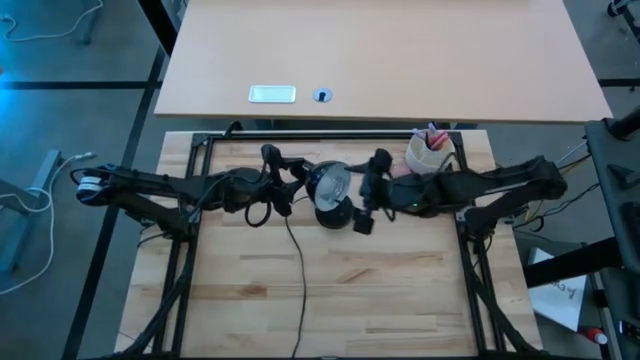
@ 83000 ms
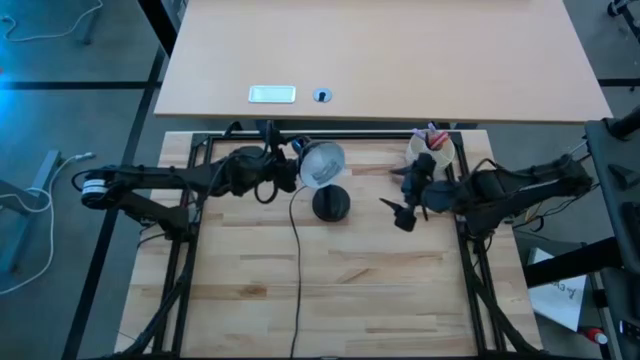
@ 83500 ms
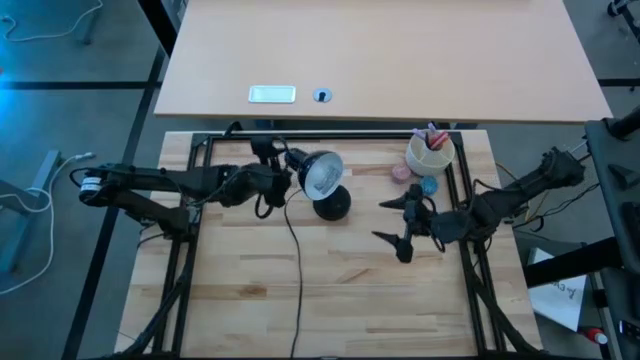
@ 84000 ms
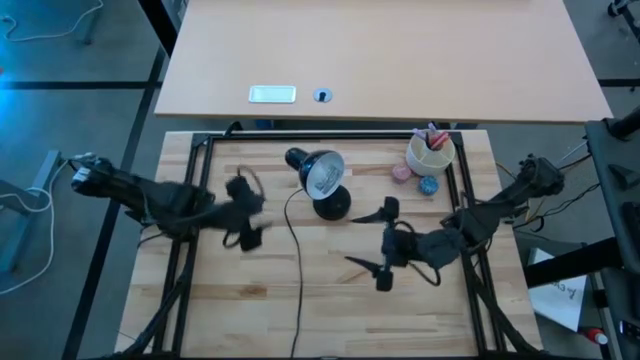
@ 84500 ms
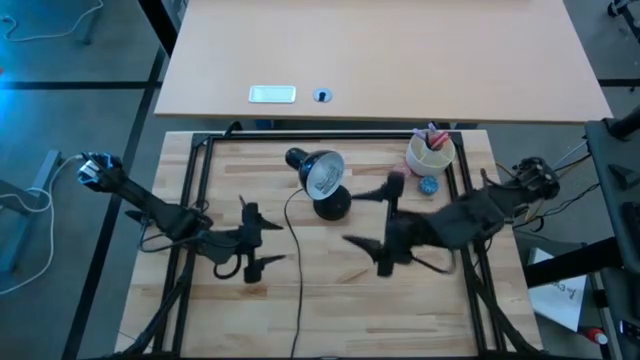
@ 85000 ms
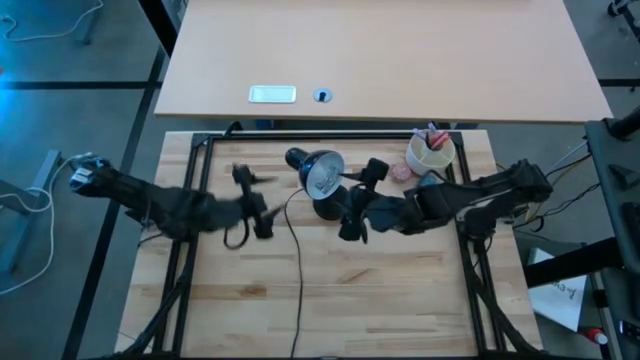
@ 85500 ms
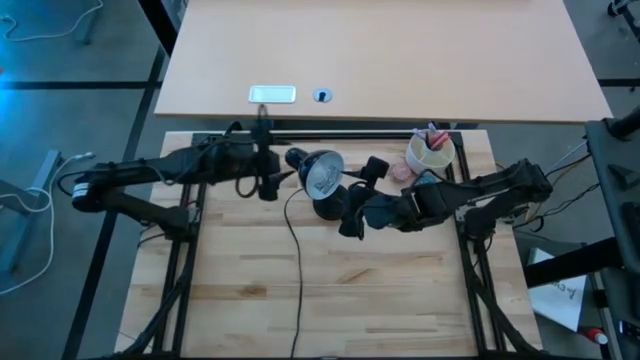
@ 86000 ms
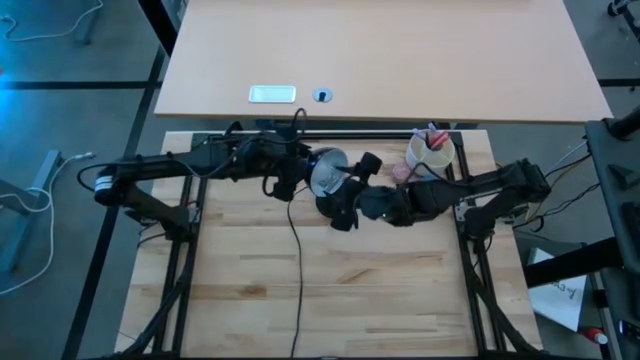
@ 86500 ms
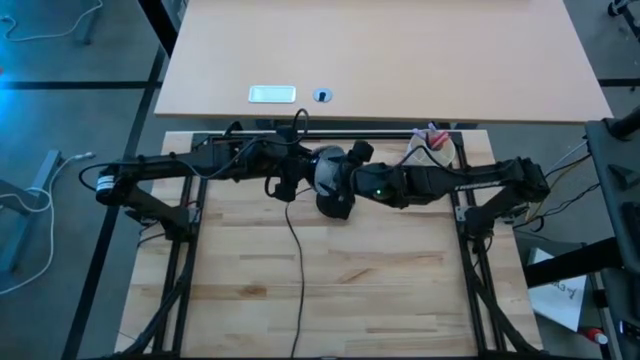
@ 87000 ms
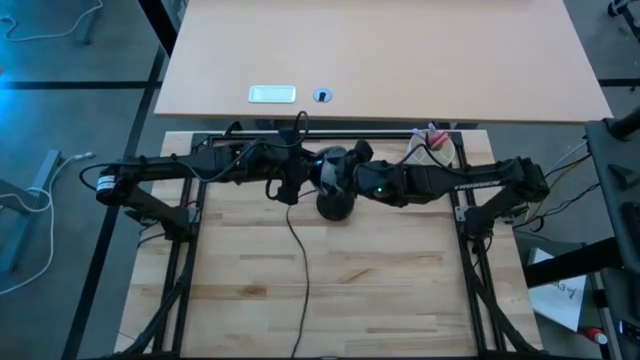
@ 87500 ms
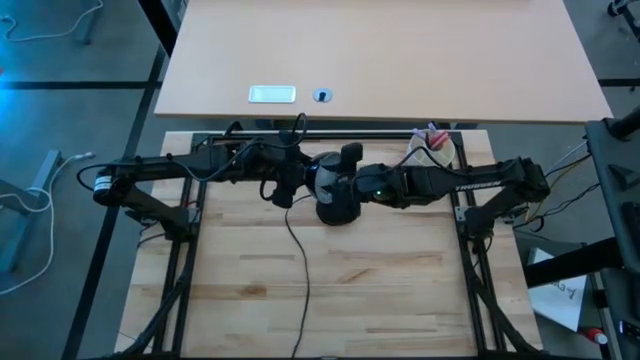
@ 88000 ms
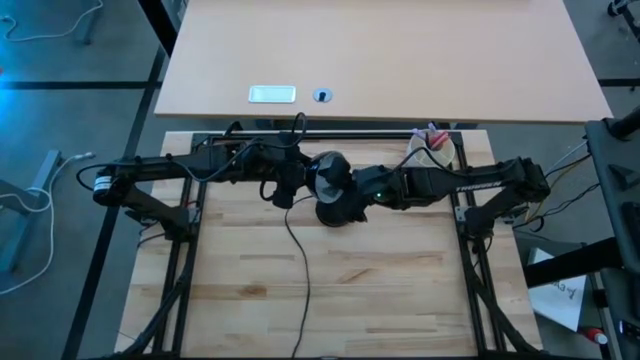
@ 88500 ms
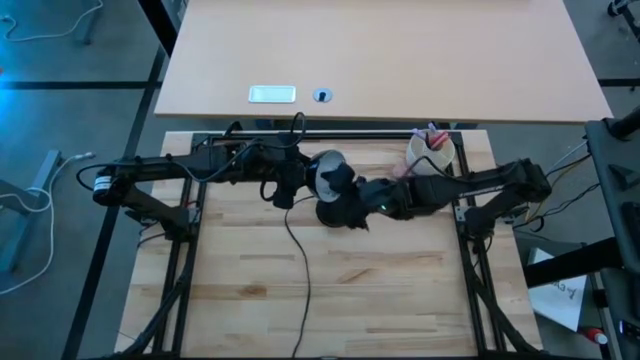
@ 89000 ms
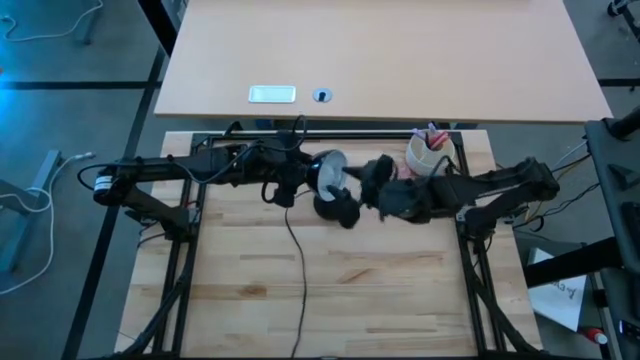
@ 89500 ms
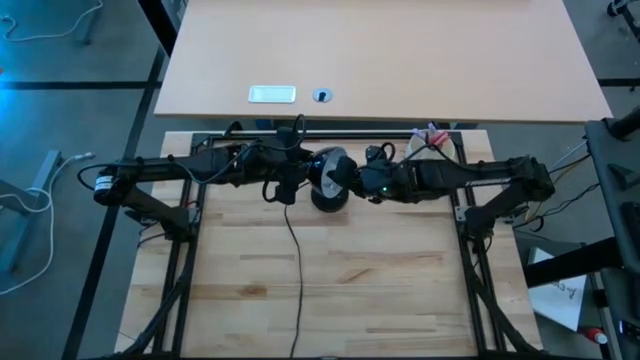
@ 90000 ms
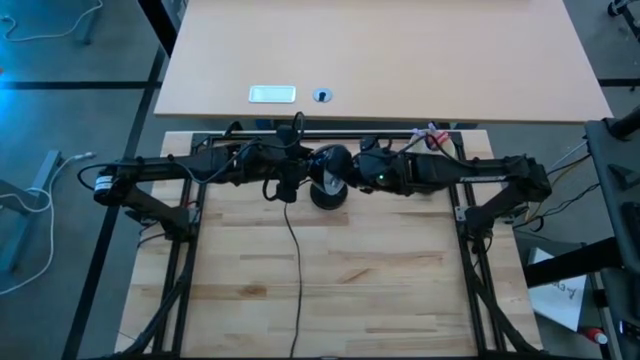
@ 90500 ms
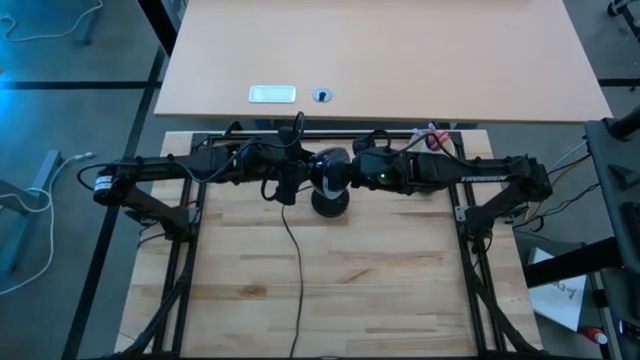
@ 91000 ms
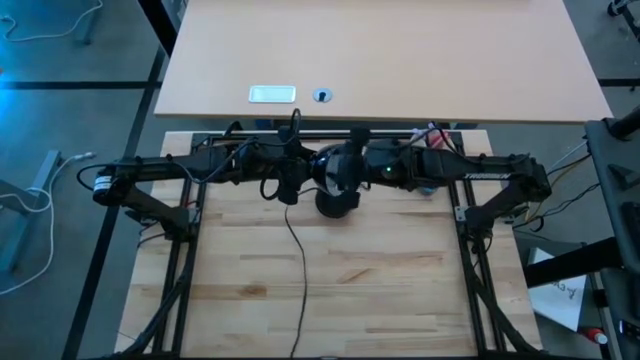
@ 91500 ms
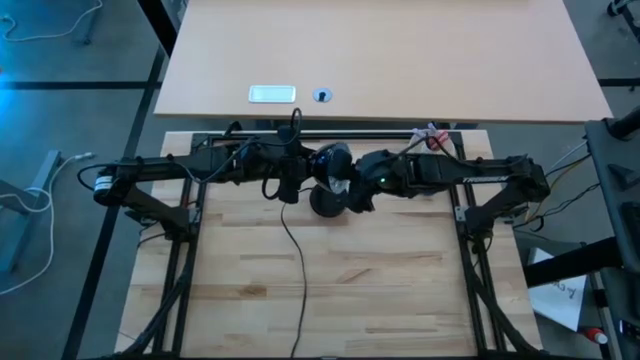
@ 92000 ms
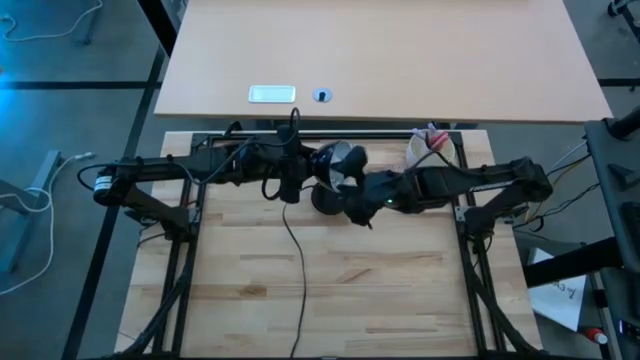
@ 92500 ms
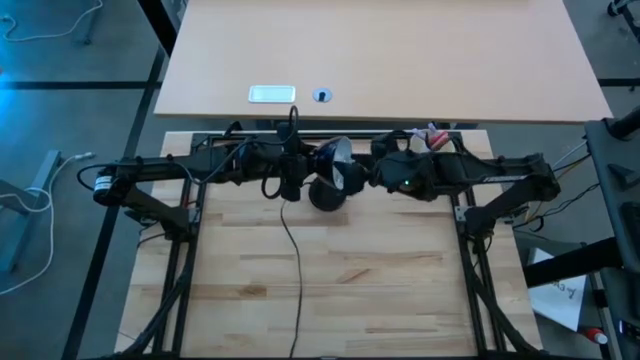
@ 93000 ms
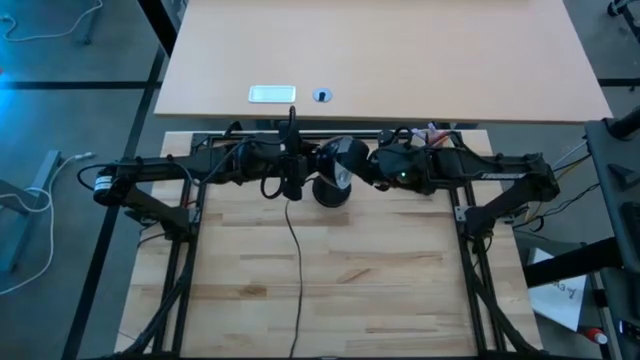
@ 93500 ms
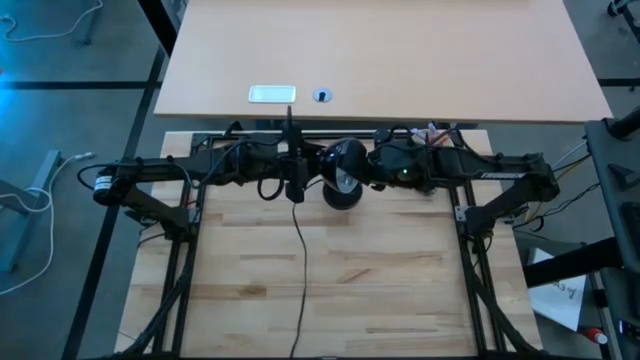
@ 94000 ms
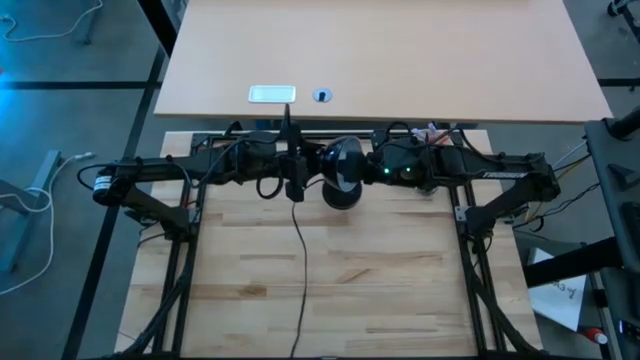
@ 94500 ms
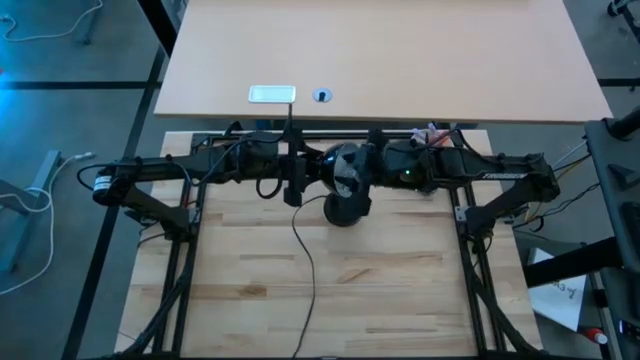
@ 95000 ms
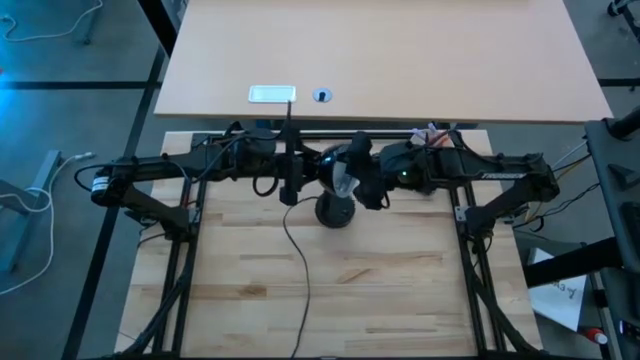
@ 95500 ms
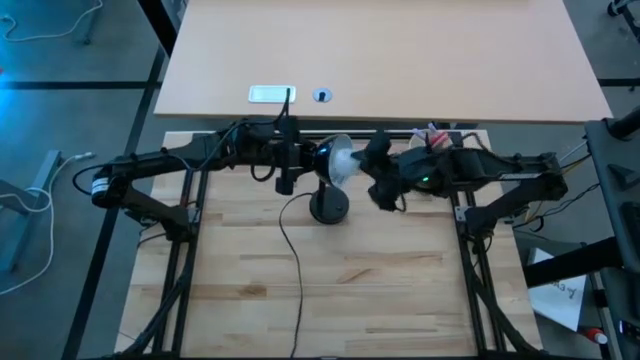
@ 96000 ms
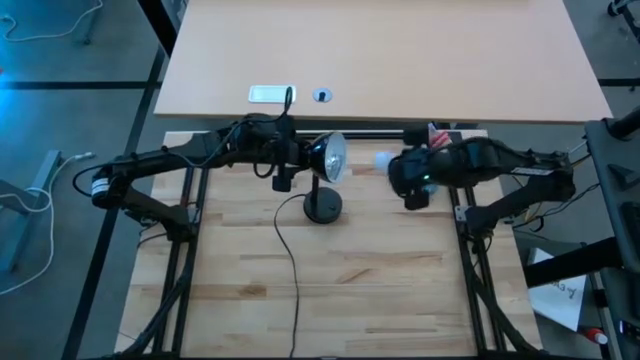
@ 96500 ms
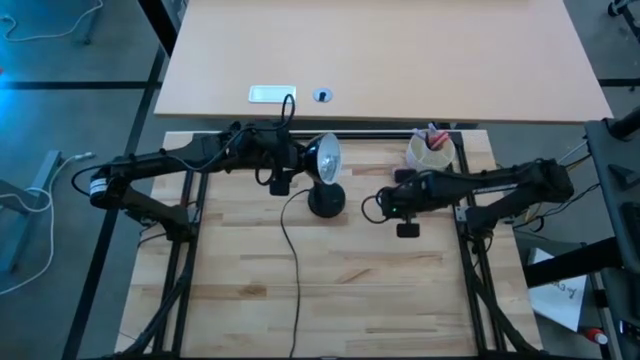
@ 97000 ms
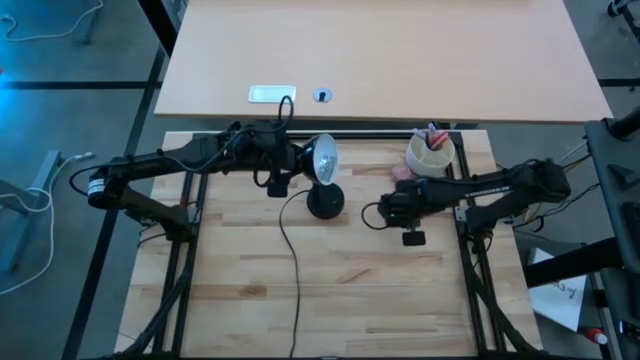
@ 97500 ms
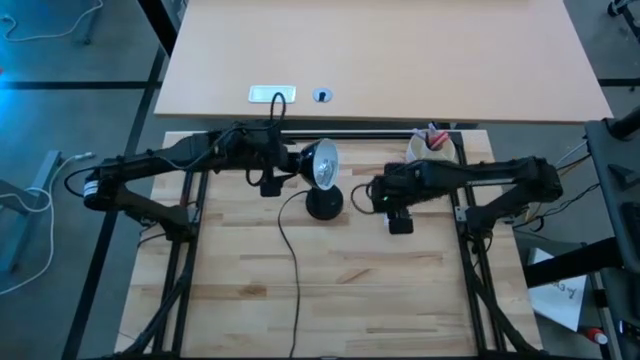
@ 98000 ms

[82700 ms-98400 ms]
Task: Screw lightbulb
Remove the lightbulb from the lamp

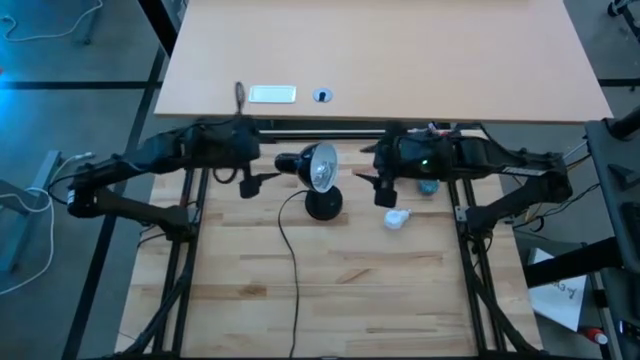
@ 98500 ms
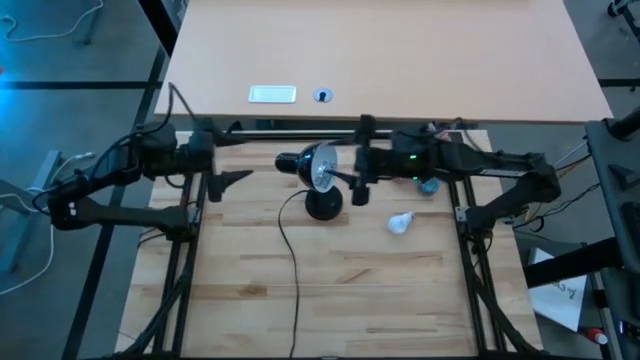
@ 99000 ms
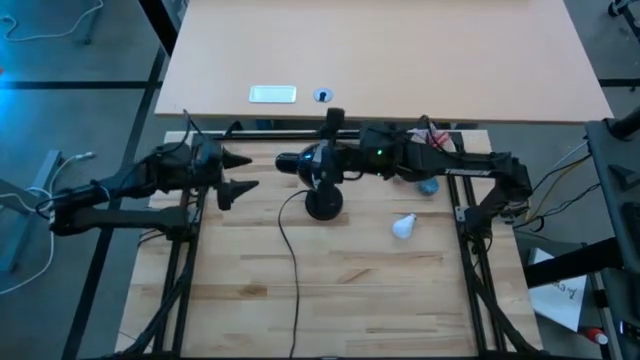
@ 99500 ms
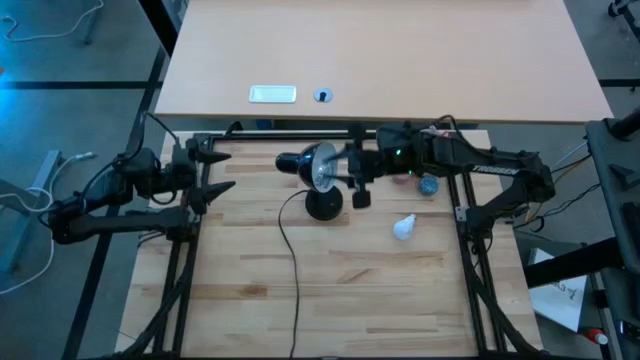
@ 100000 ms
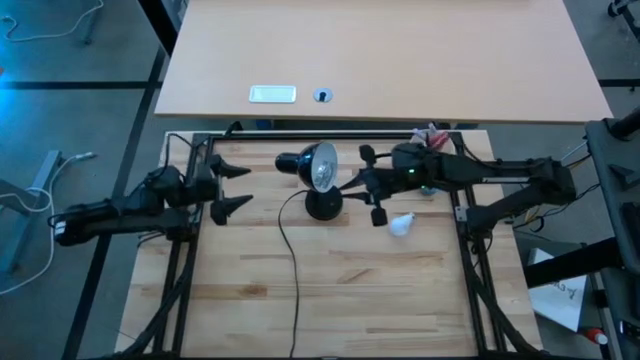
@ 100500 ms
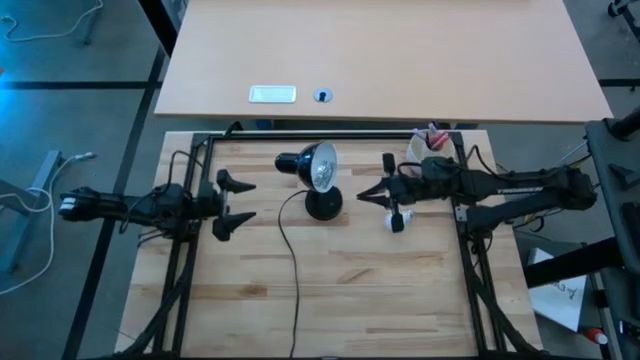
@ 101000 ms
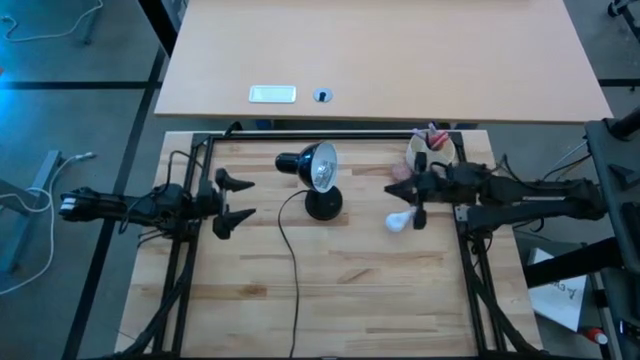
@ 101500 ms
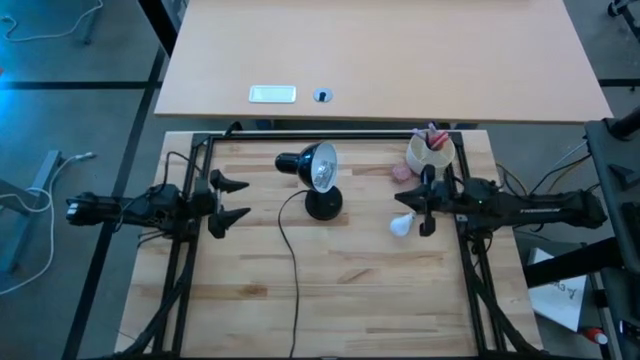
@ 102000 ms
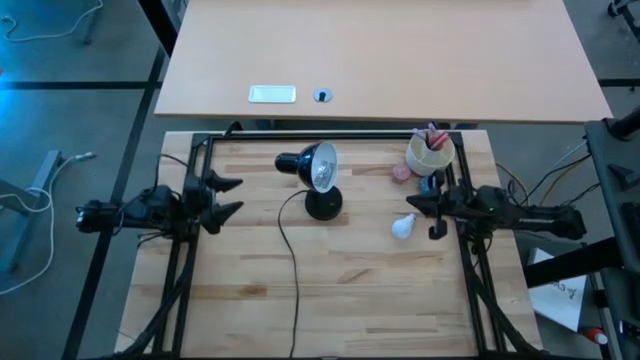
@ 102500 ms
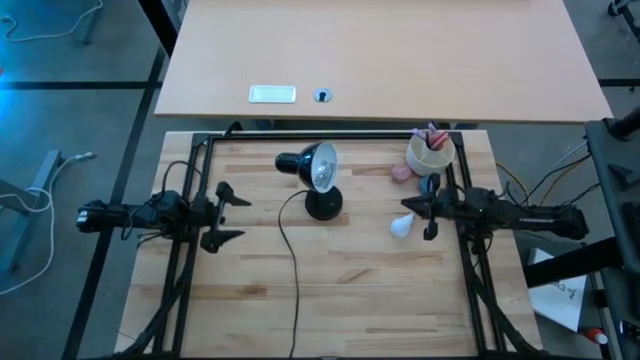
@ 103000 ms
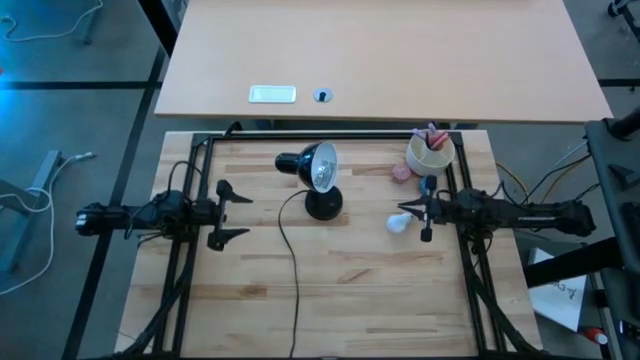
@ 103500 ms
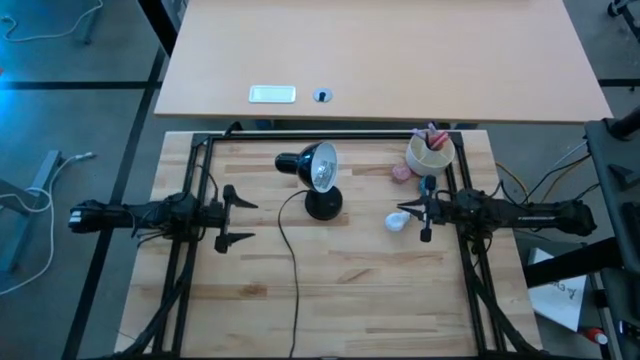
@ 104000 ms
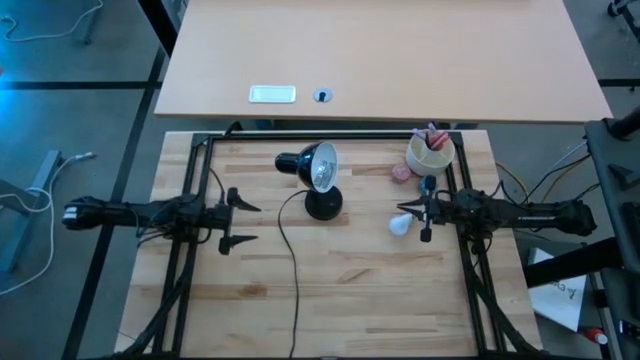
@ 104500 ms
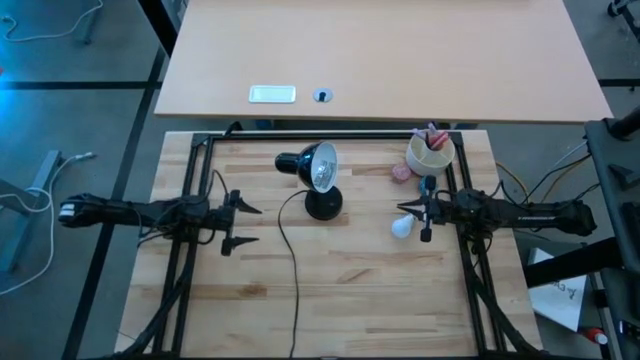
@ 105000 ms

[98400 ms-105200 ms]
Return to Home Position
